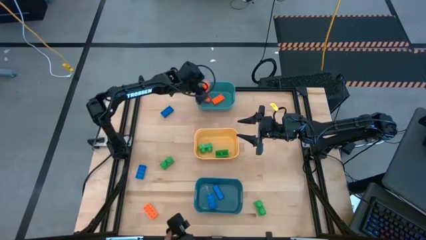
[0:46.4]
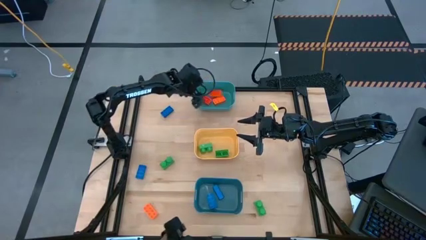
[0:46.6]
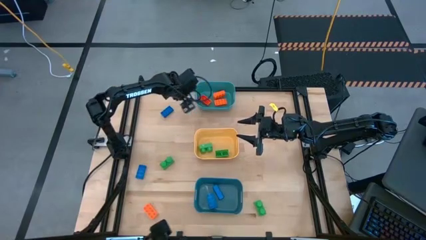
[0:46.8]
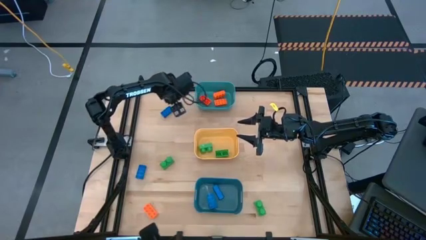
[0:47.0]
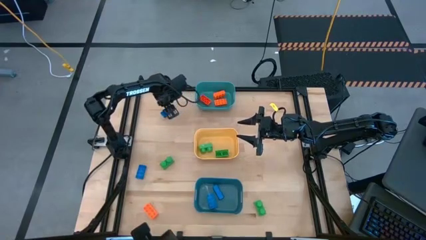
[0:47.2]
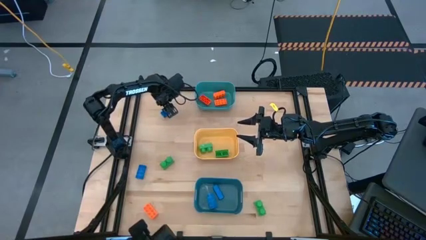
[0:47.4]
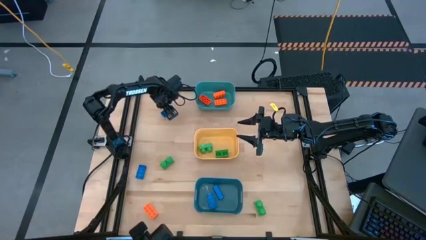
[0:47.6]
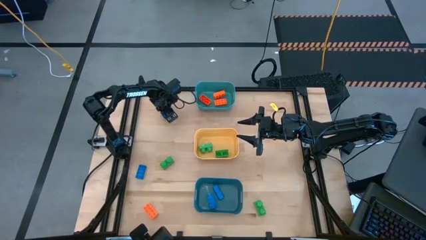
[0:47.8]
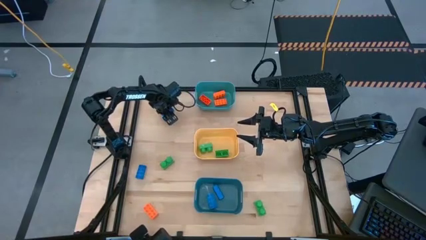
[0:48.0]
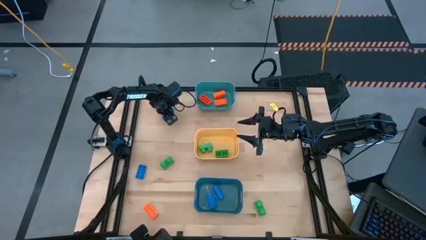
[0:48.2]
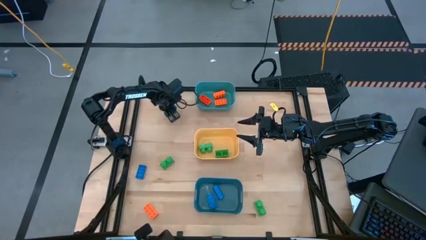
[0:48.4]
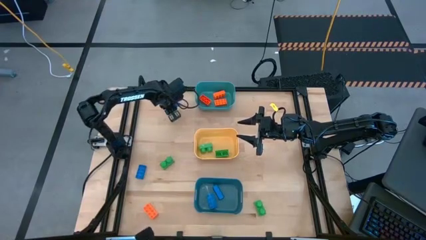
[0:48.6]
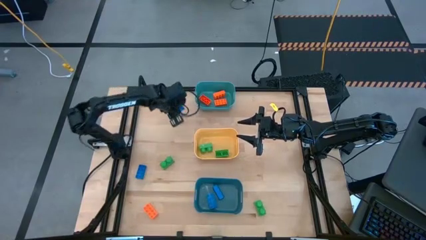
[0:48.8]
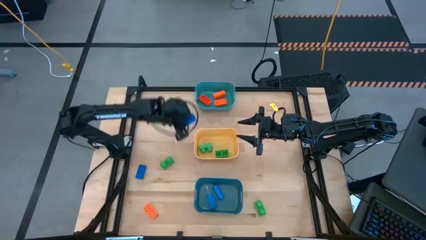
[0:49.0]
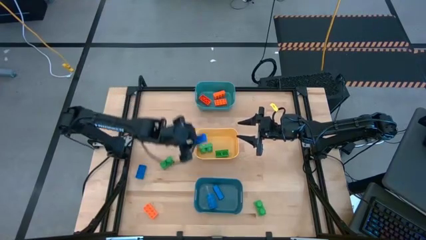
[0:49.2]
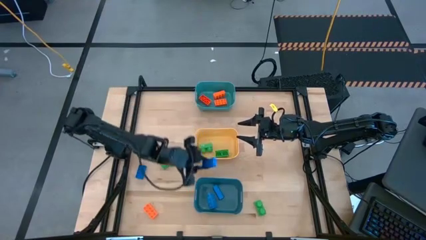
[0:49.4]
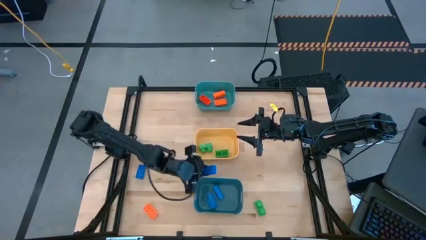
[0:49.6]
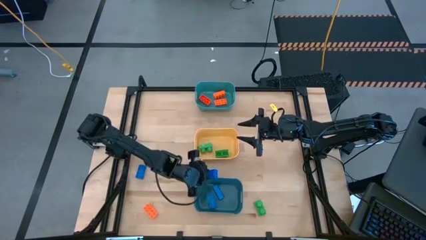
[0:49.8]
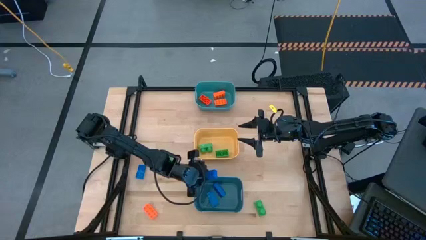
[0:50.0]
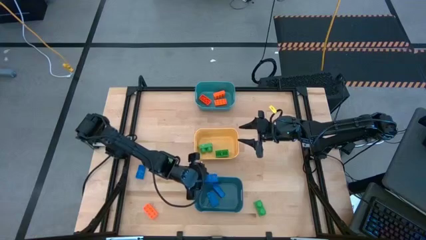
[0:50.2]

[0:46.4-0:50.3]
Task: Sort & place blocks by color
Put the blue game piece into the blue bin

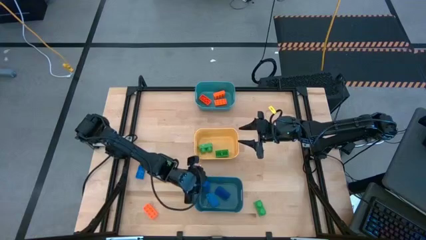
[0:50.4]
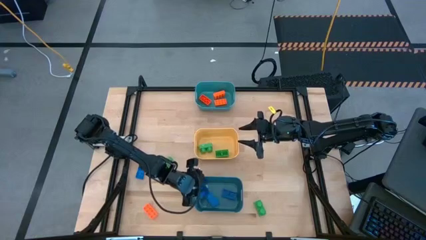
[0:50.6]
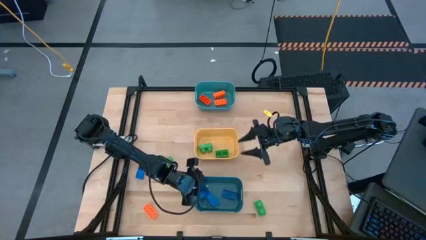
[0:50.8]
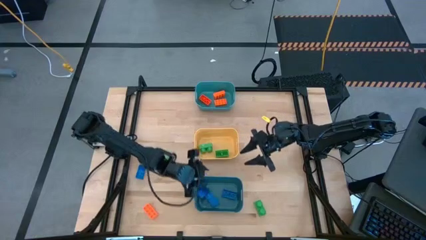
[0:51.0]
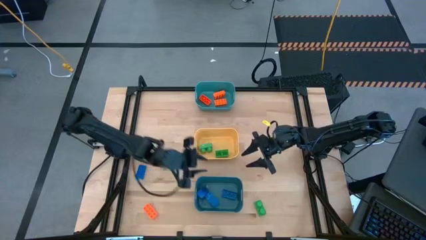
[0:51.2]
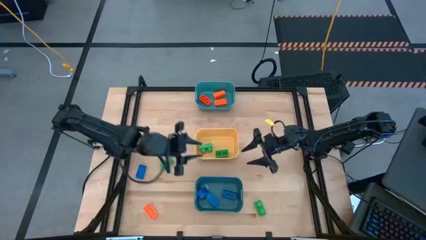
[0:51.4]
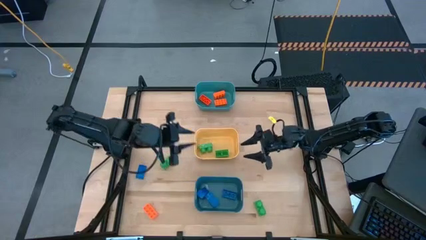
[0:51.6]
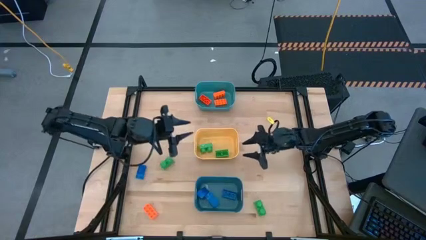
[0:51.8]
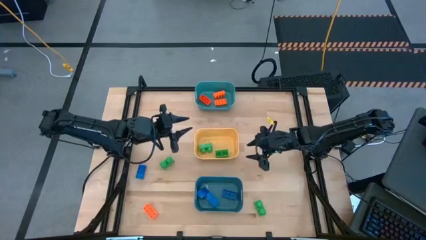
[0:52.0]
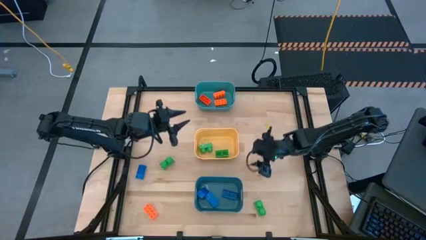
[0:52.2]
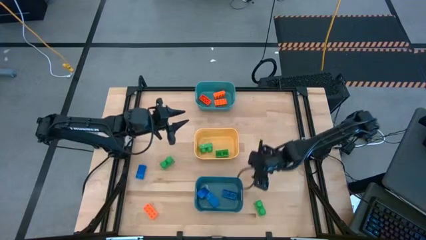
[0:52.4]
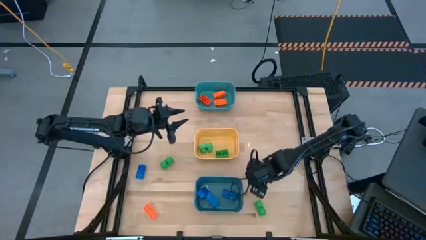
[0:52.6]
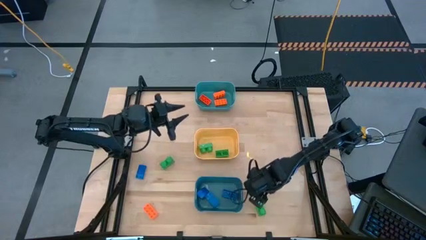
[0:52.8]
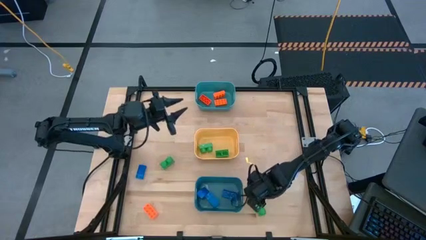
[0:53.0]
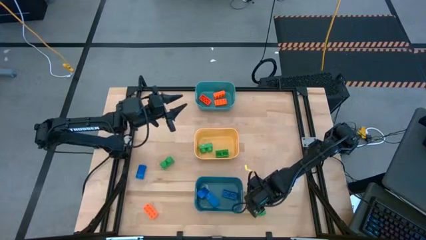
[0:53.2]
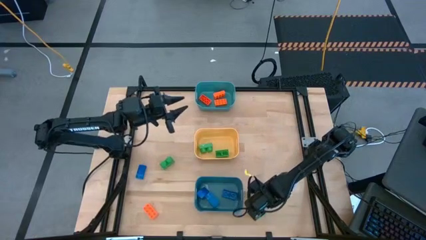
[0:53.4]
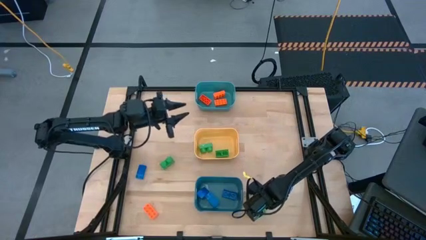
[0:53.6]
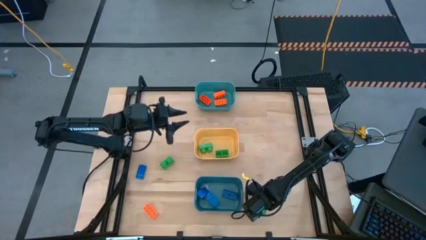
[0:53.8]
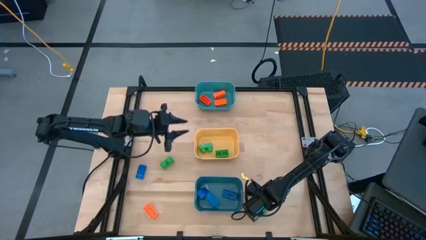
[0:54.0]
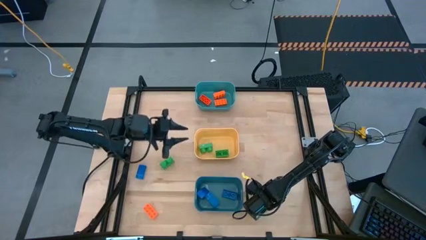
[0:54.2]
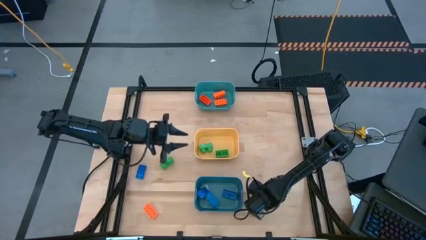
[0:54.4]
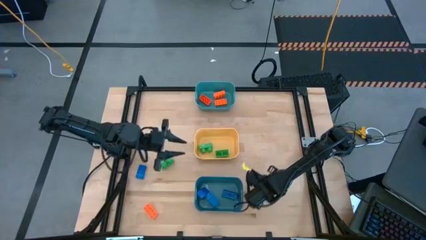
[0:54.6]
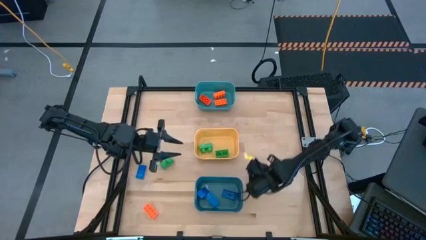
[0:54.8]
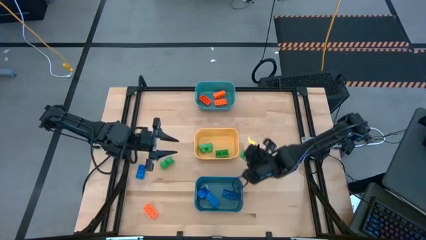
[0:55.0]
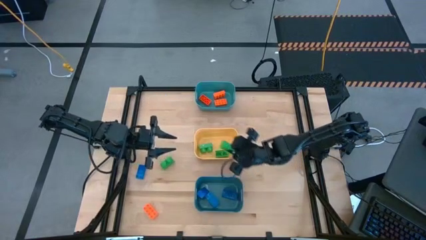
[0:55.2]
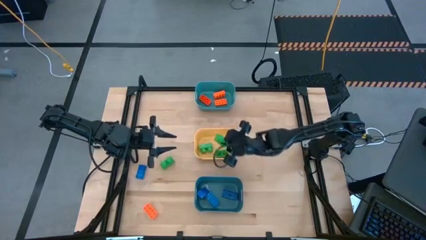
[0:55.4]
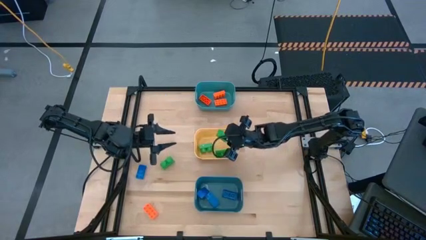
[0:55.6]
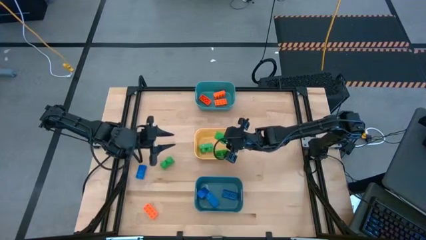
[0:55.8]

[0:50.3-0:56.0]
Put the green game piece into the yellow bin

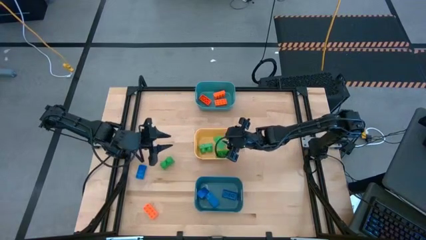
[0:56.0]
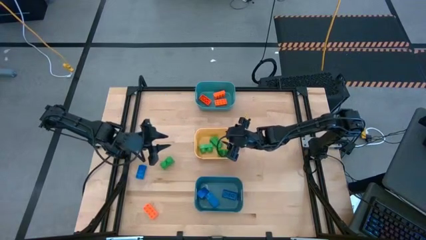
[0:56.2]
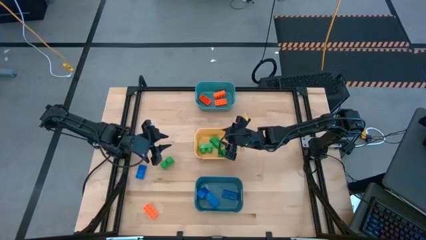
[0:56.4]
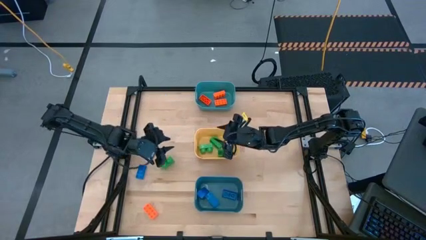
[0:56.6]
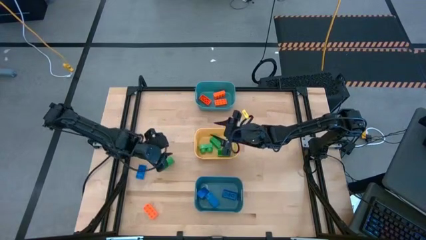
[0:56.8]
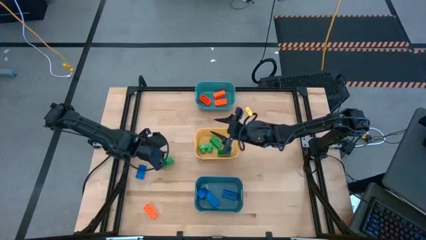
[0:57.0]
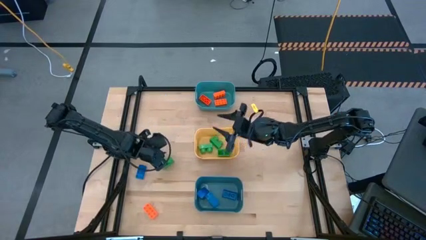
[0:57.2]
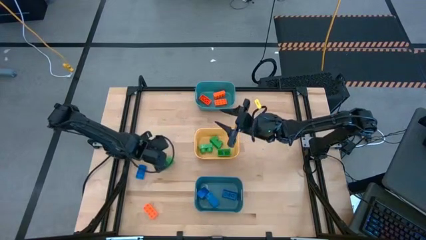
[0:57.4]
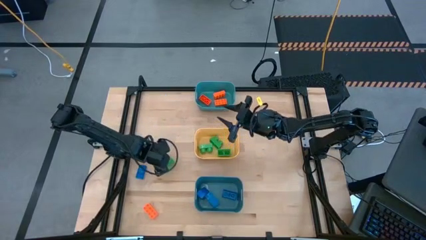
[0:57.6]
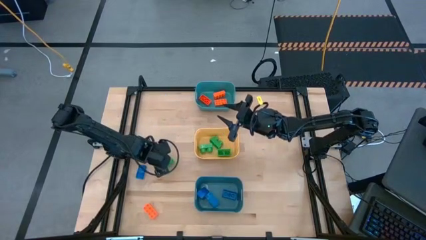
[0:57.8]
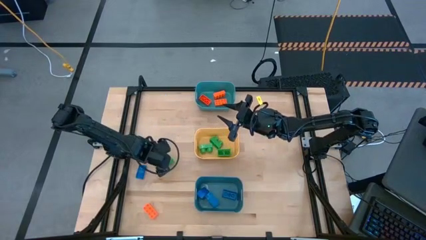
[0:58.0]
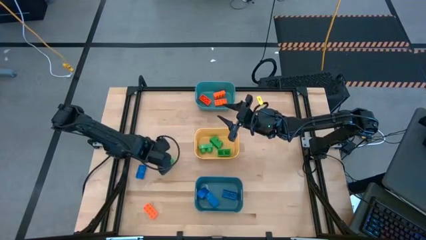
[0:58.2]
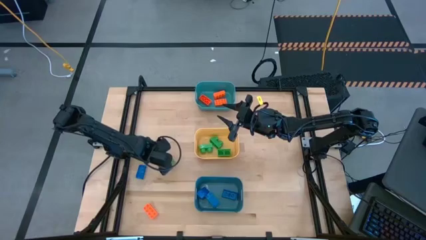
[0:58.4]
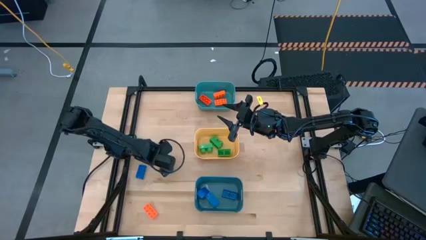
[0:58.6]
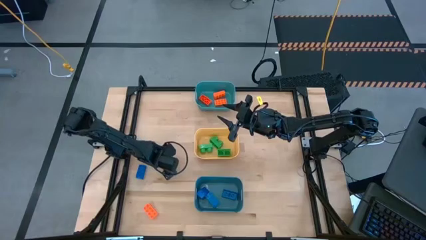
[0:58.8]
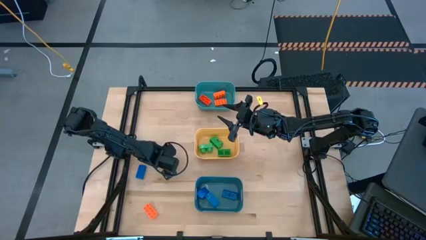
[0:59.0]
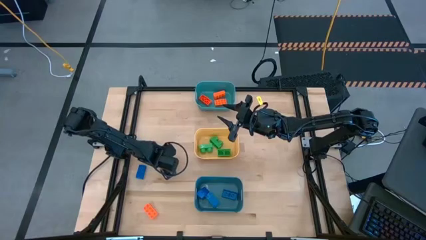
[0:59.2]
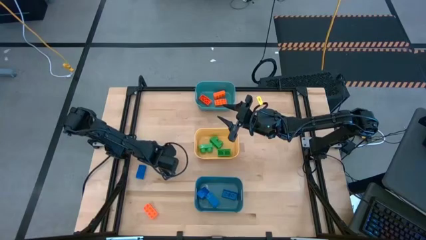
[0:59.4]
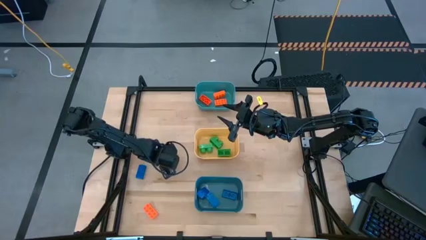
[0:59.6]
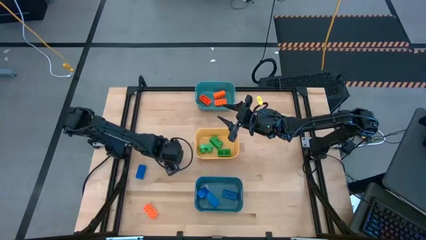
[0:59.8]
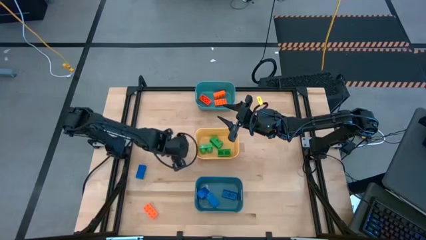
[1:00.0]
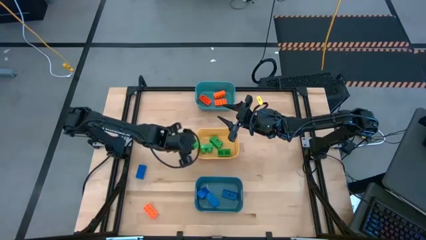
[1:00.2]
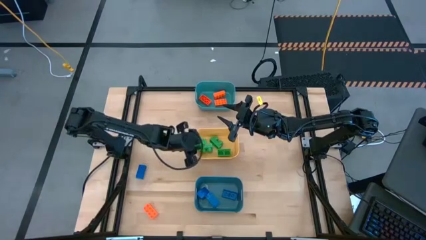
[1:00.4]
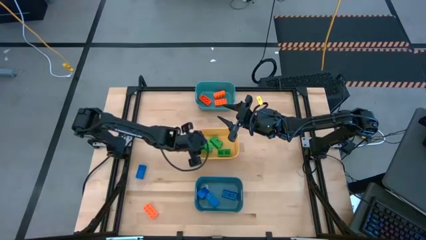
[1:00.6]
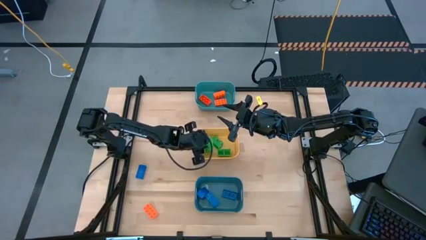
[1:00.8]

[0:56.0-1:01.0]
Put the green game piece into the yellow bin

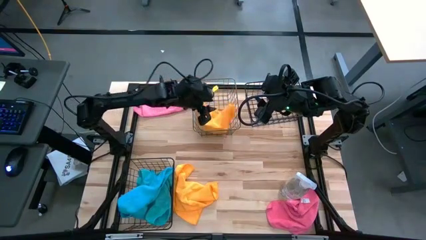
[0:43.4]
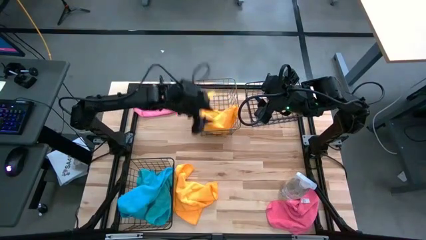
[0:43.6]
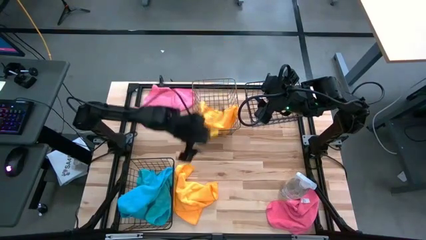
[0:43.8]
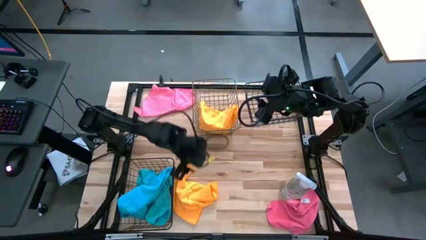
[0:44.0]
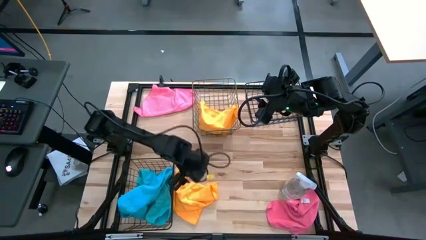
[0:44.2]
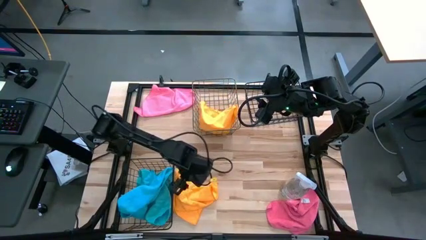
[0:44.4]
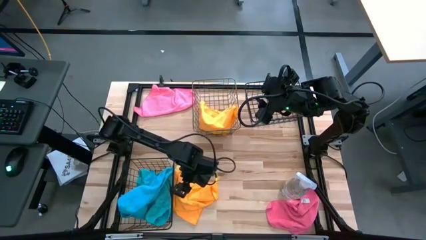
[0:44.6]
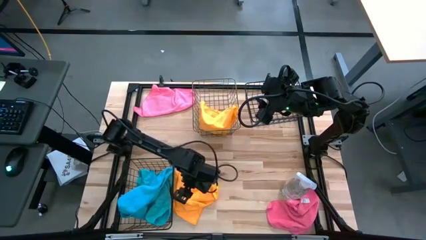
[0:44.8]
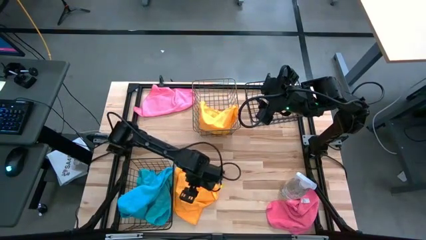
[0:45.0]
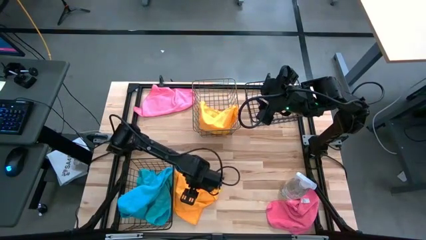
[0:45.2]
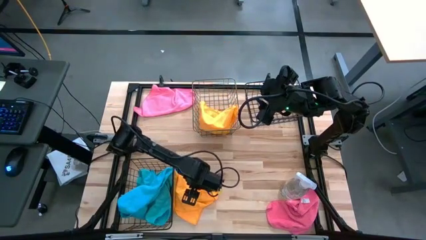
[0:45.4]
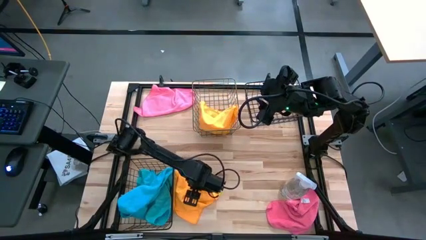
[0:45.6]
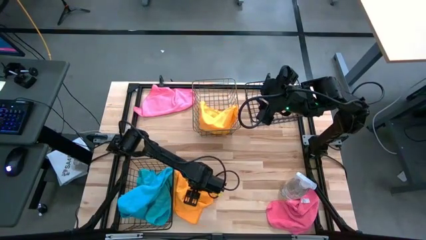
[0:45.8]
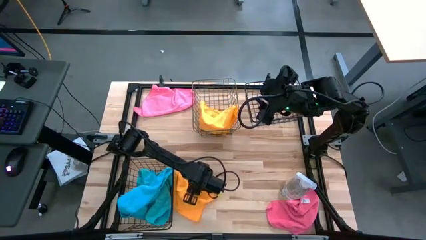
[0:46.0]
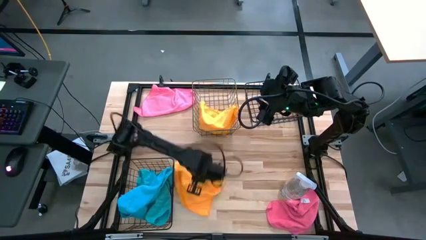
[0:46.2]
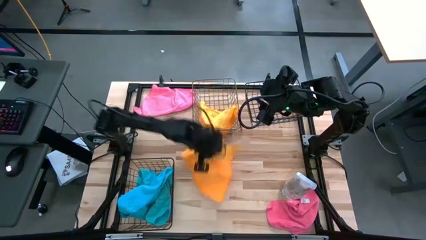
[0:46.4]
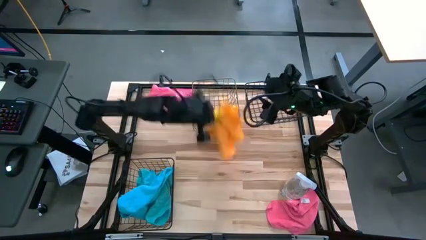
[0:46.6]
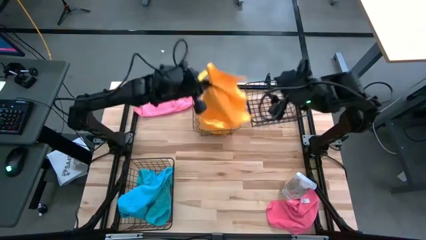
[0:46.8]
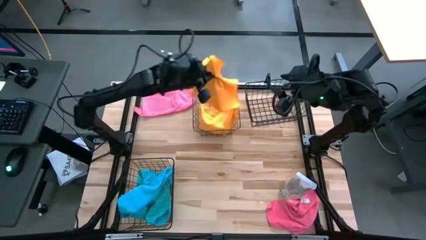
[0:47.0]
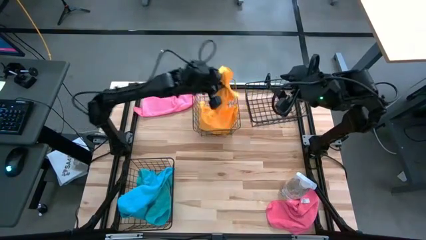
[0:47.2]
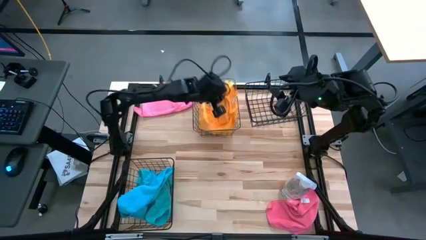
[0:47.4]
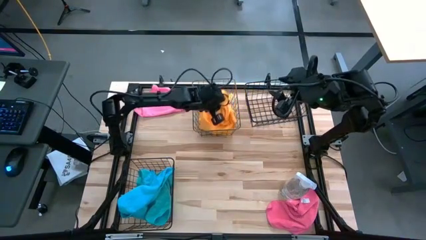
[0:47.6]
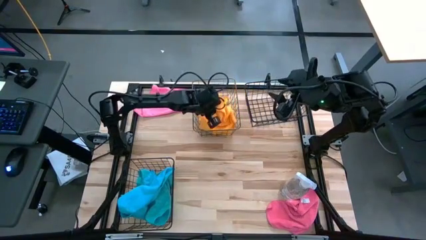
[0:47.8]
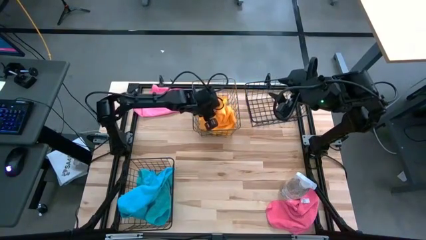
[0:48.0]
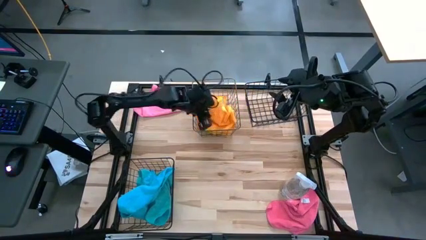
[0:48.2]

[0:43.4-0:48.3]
Task: Sort microfiber towel by color & place in baskets
Put the yellow towel into the gold wire basket
